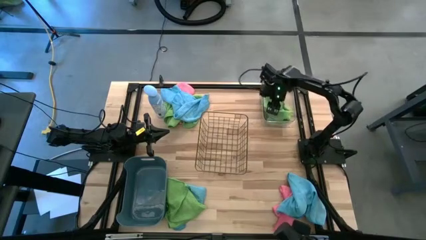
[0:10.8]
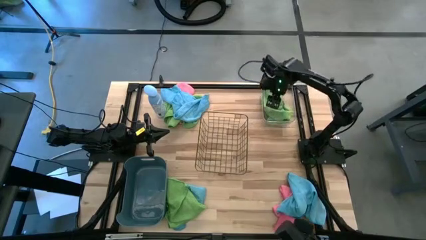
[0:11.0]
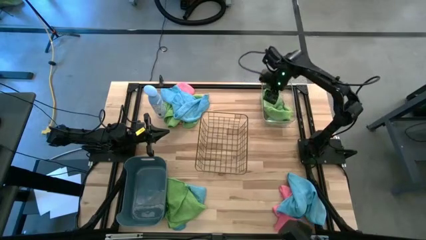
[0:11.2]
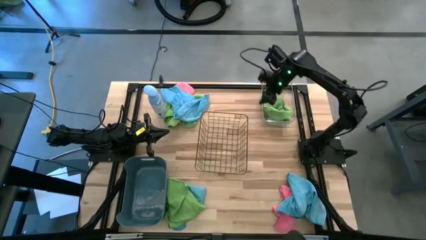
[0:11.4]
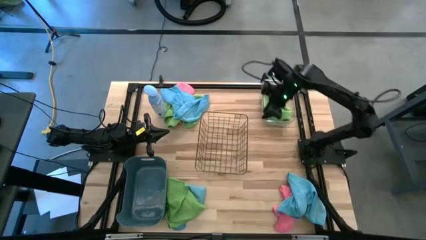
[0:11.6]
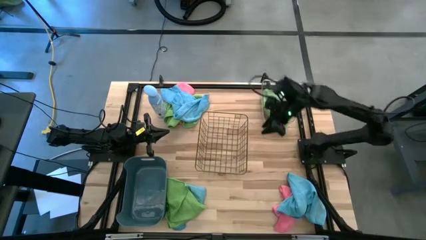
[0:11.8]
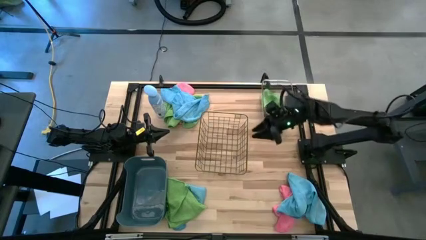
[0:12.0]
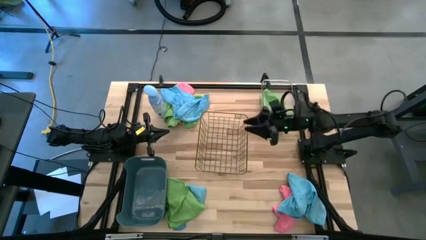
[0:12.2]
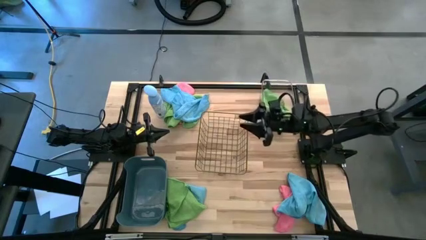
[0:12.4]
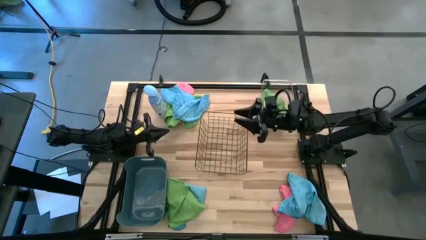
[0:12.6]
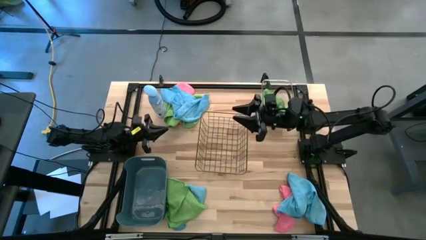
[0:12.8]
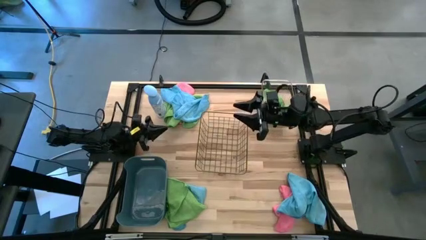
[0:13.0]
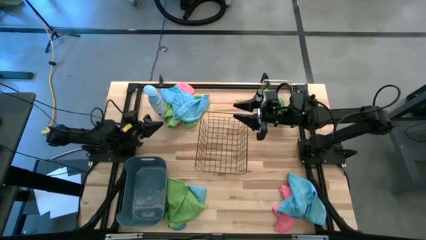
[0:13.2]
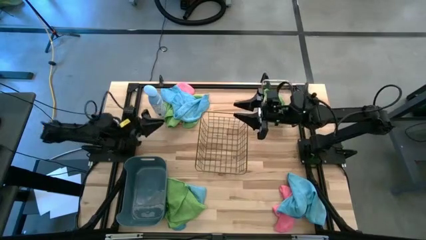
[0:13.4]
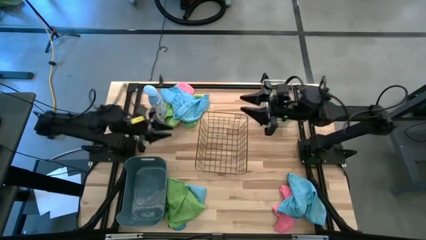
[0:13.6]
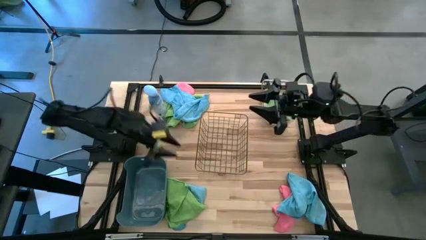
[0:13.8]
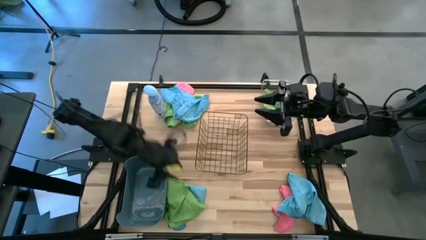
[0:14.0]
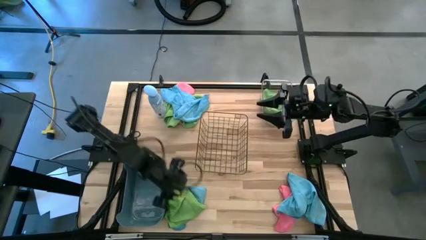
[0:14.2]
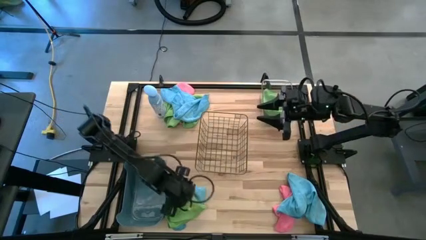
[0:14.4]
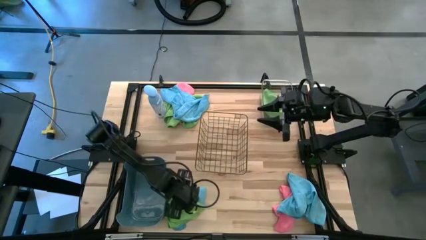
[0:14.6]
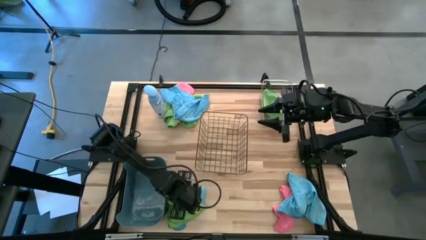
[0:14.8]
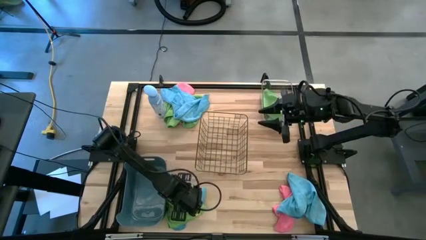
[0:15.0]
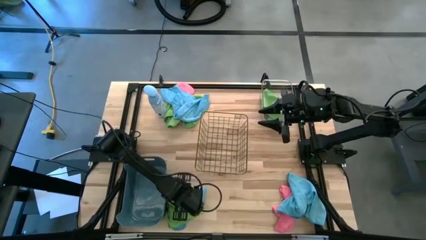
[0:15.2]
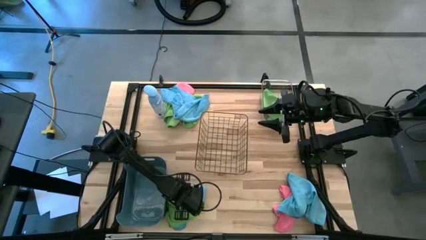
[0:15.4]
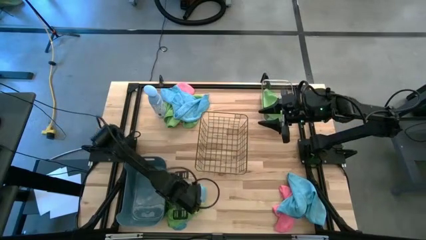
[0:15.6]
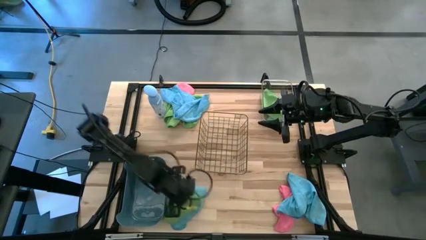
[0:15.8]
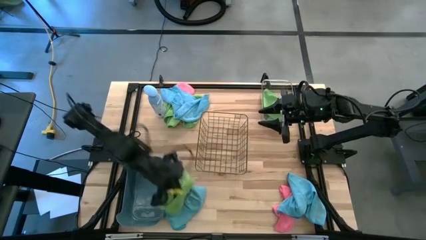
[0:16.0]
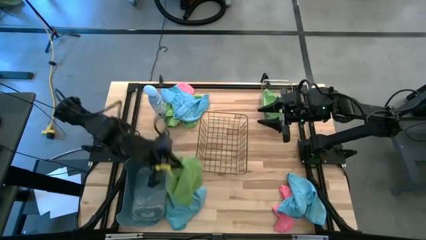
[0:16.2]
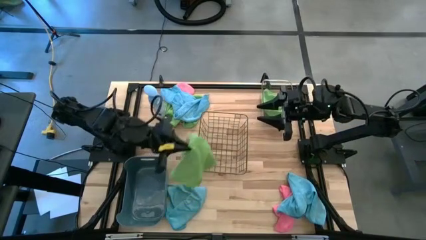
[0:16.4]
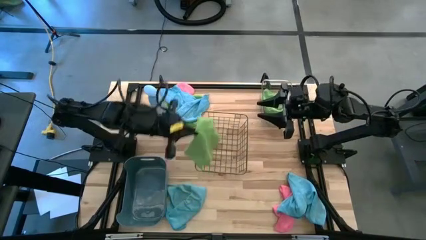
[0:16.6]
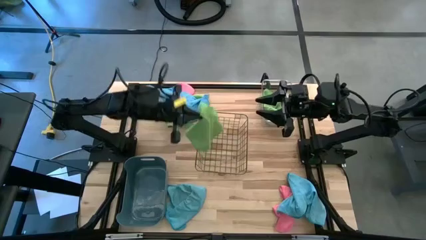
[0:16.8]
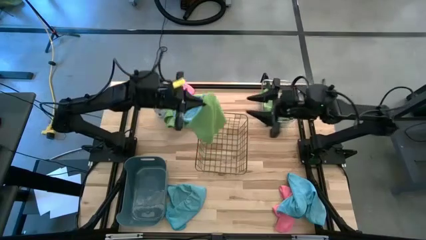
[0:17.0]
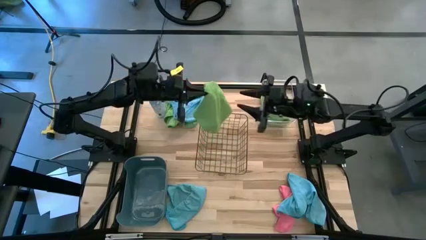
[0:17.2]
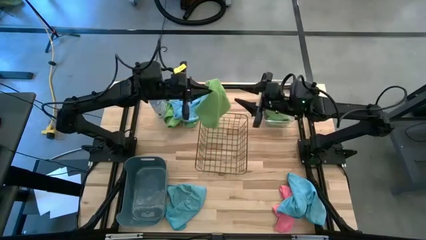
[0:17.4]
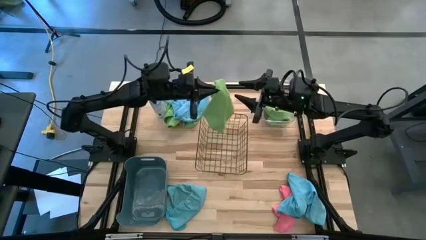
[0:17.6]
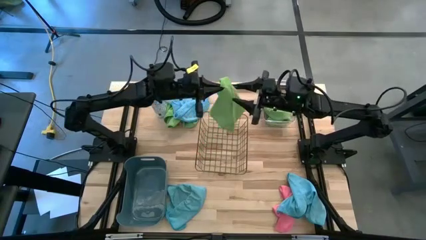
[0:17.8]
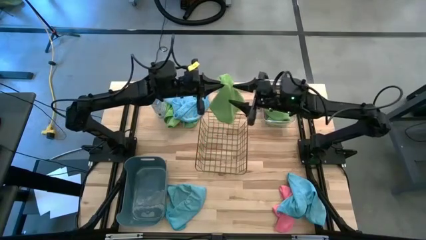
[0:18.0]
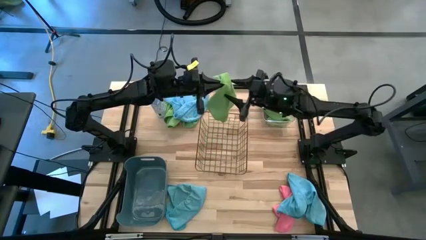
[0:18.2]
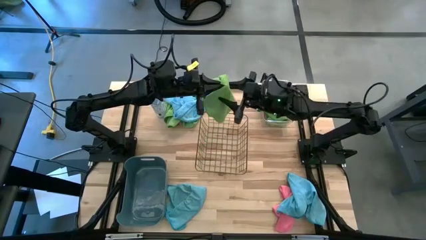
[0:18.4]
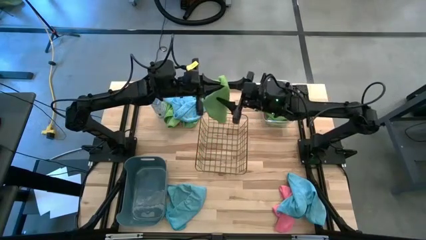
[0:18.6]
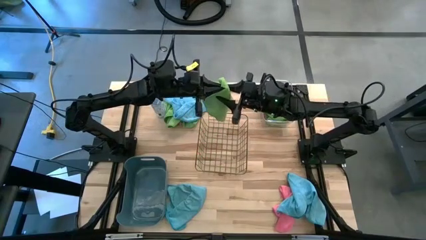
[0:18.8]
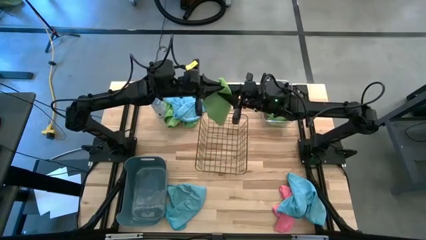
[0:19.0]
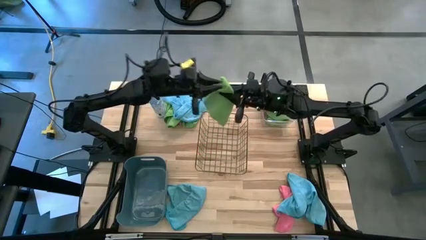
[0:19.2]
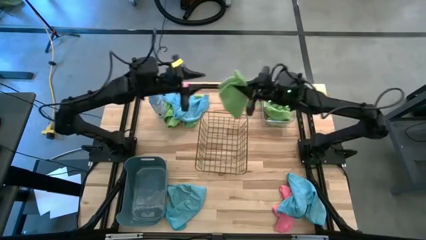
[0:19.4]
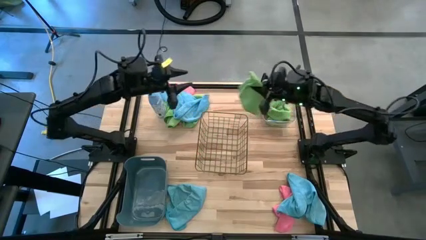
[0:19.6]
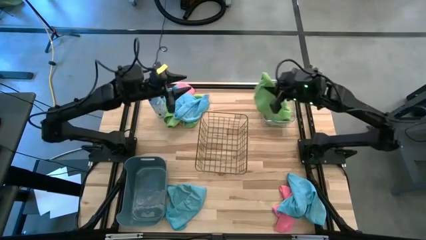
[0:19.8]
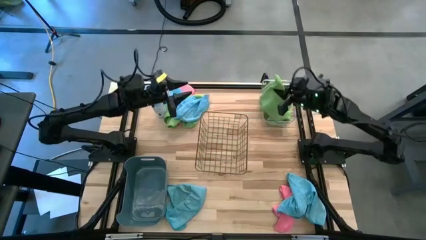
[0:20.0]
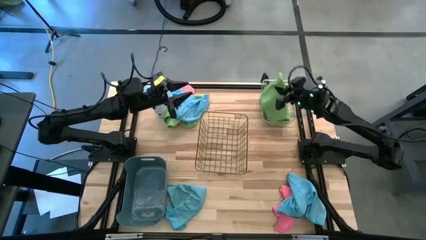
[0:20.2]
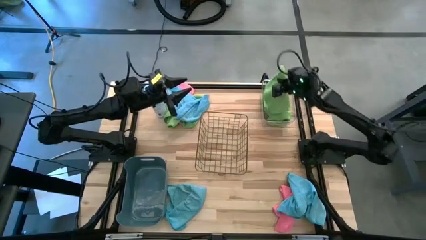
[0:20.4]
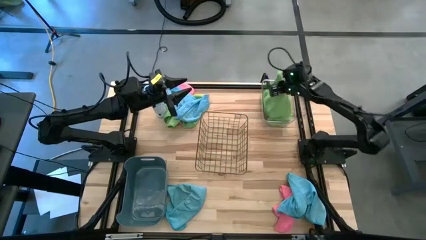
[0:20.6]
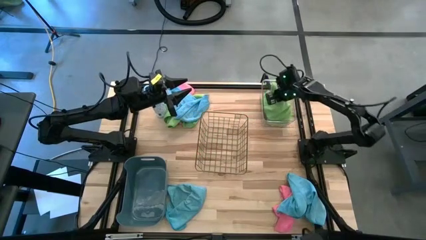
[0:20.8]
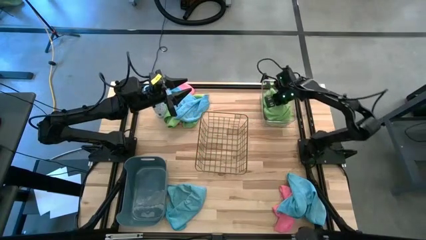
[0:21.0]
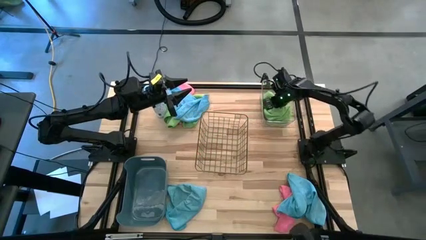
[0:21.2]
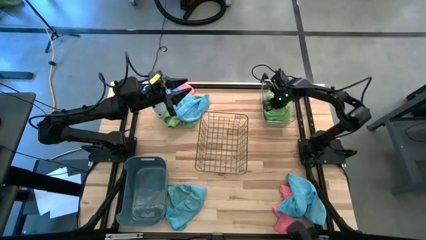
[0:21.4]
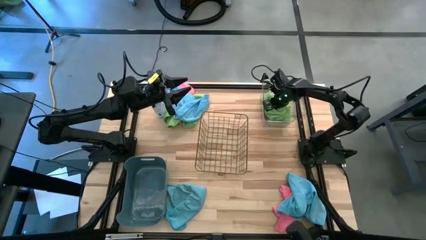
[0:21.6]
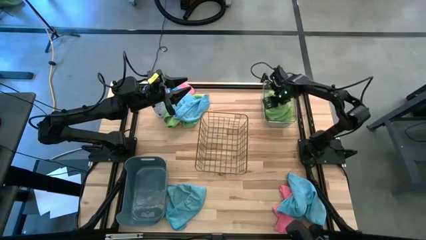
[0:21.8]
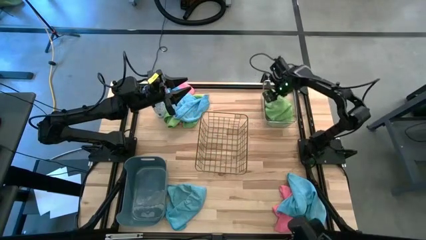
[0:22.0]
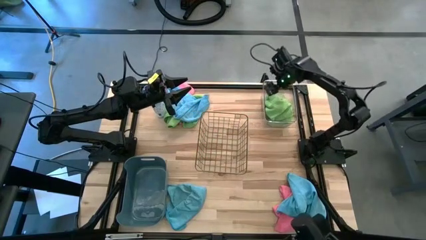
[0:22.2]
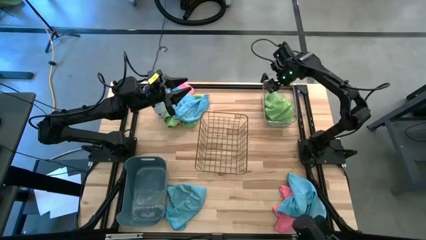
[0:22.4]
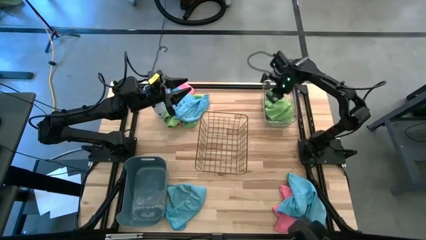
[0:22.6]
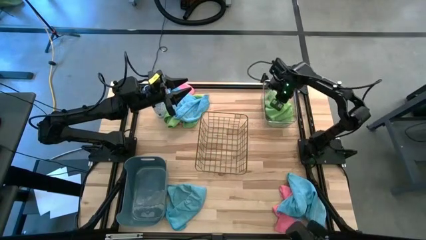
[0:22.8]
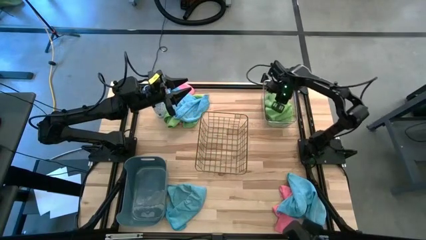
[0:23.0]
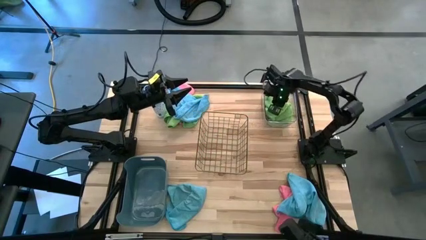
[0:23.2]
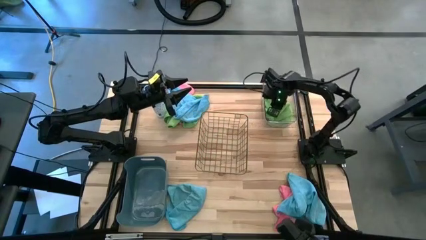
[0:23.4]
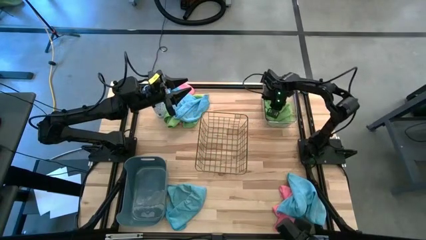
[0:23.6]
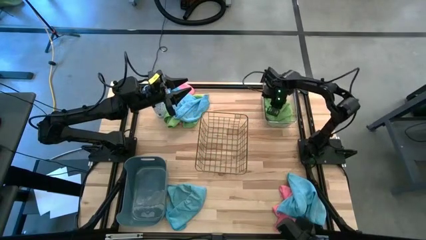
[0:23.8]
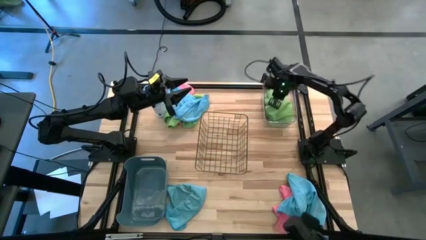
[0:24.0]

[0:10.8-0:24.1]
Task: Sort microfiber towel by color & place in baskets
Put the bottom green microfiber cloth into the transparent bin

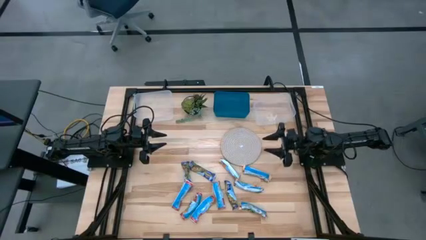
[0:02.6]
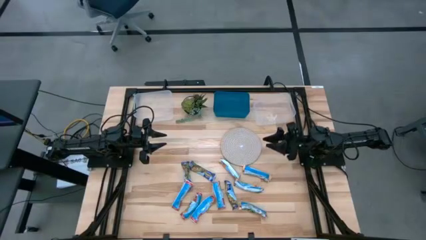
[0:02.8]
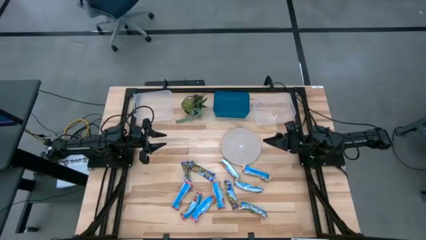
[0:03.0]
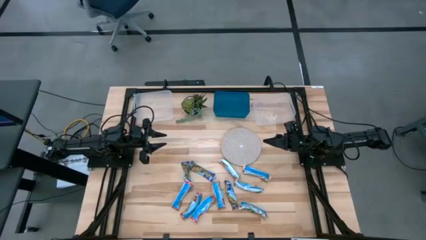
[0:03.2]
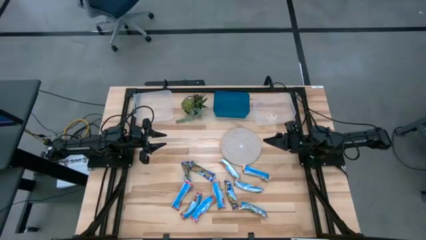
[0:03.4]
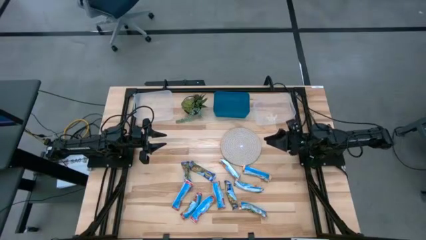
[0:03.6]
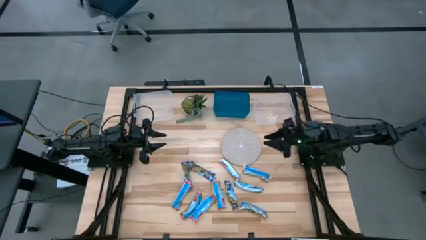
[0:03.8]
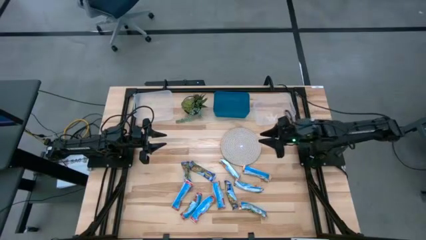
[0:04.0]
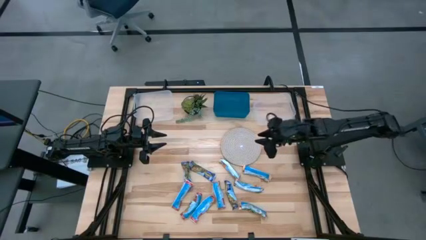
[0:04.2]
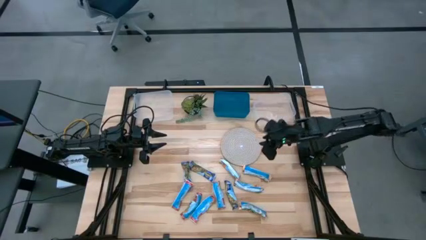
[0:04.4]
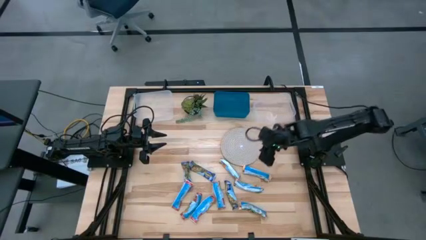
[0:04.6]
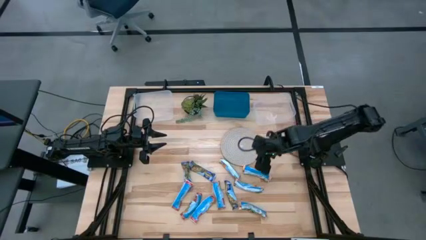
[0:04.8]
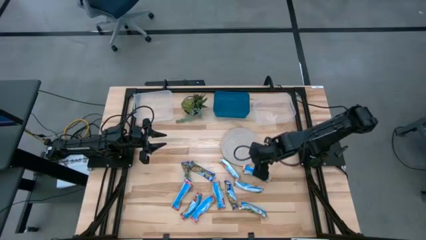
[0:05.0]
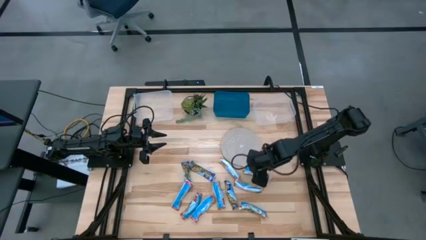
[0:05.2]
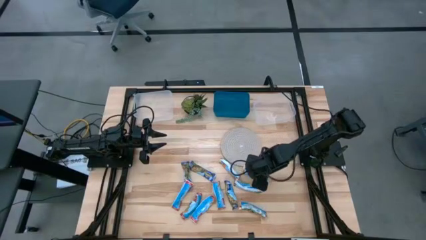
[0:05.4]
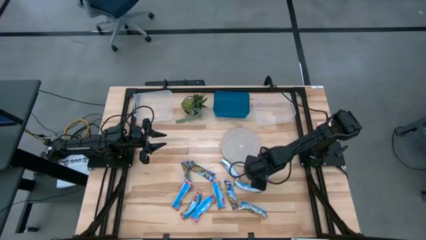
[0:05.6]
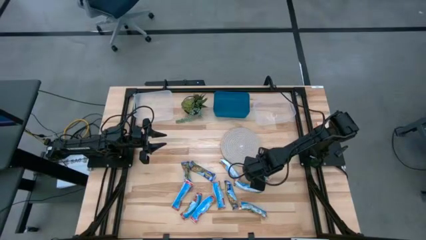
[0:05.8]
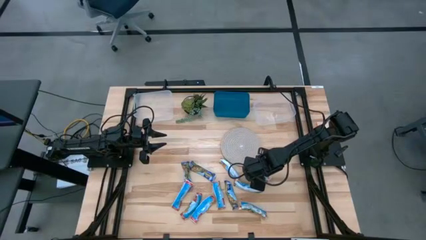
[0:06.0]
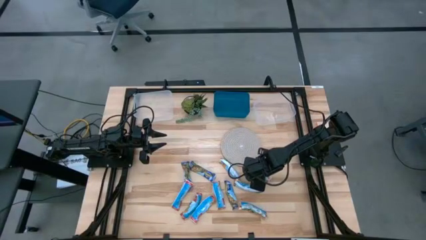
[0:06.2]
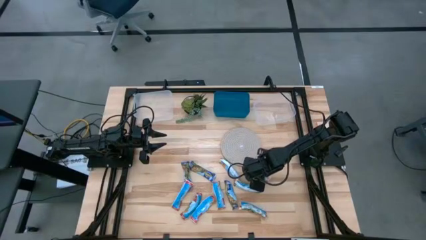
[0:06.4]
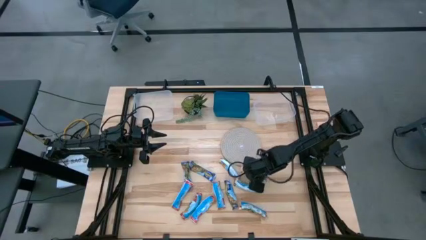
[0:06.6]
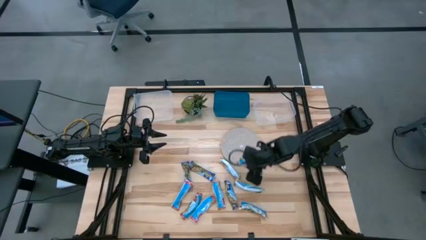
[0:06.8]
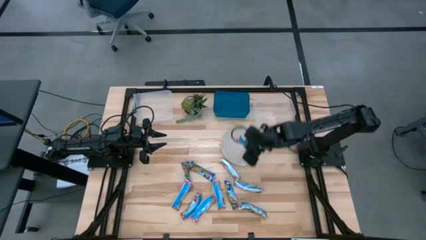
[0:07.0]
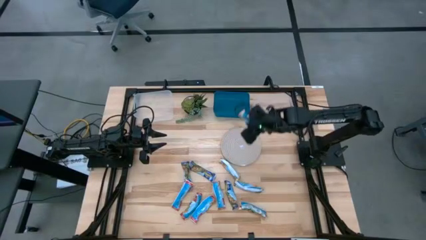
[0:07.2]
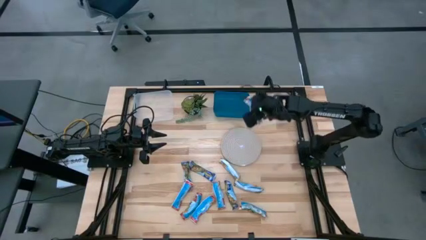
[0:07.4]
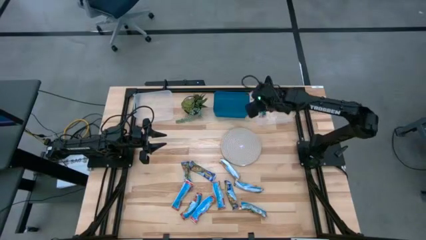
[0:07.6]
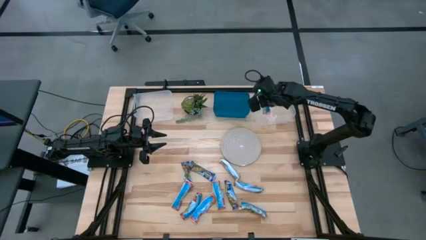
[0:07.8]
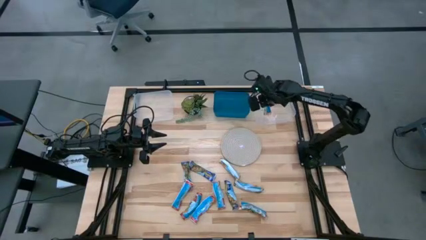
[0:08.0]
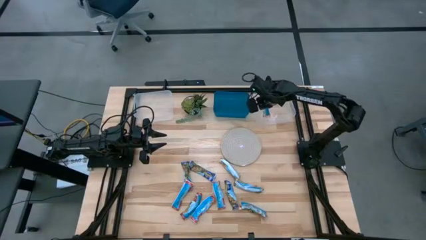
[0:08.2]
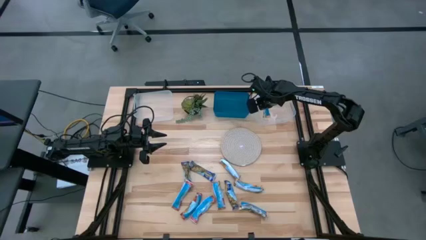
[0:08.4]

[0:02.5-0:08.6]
Task: Pick and place Granola Bars by type
Put the yellow granola bar into the right transparent bin
